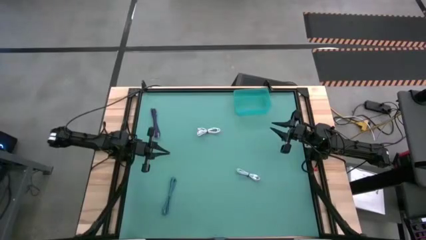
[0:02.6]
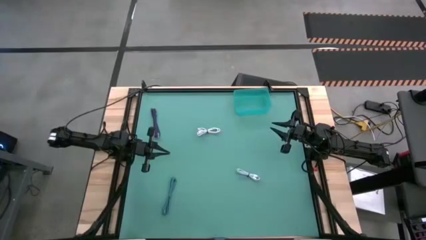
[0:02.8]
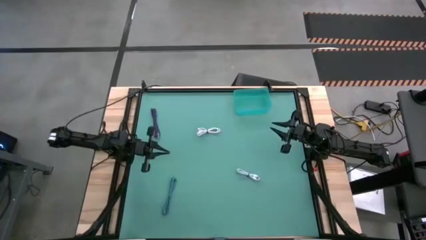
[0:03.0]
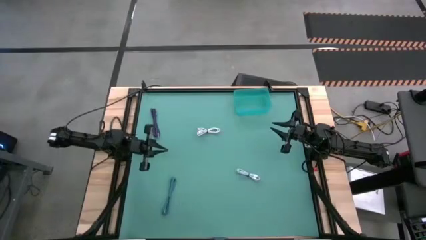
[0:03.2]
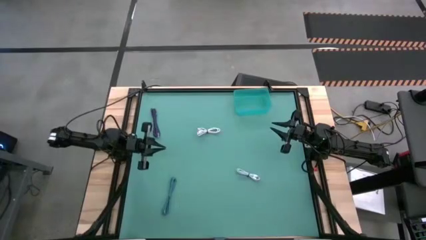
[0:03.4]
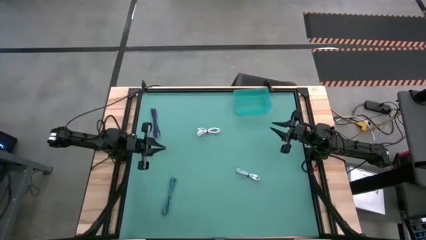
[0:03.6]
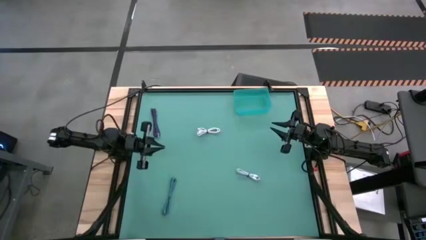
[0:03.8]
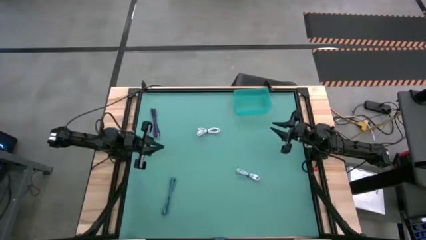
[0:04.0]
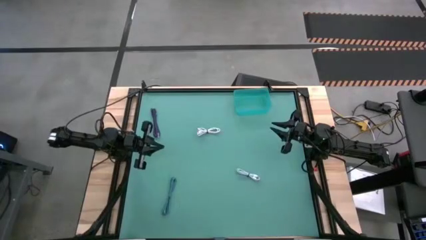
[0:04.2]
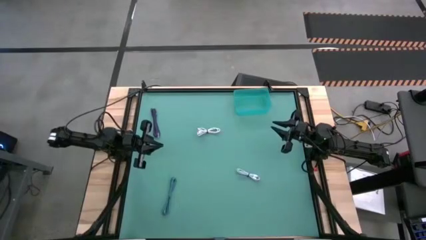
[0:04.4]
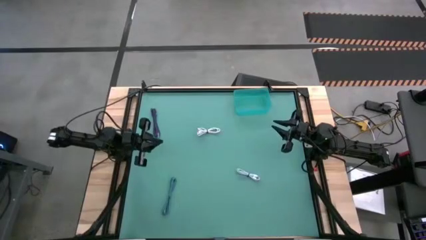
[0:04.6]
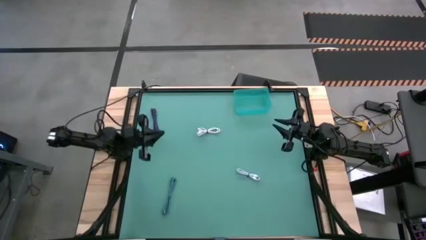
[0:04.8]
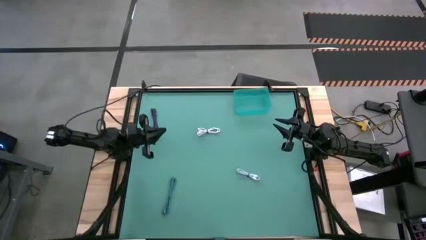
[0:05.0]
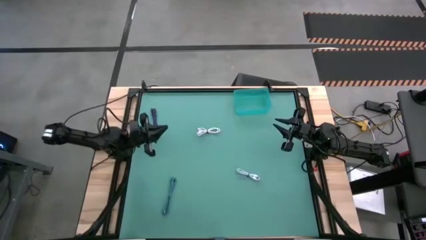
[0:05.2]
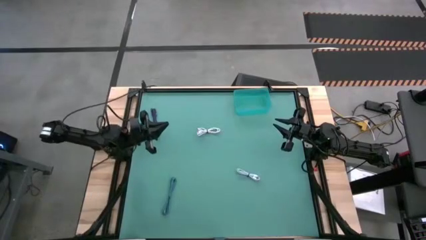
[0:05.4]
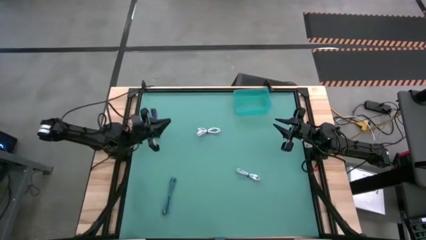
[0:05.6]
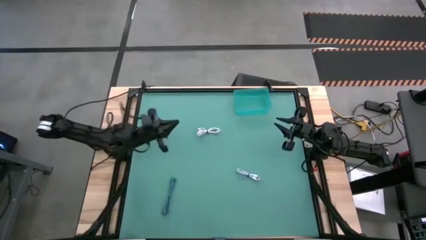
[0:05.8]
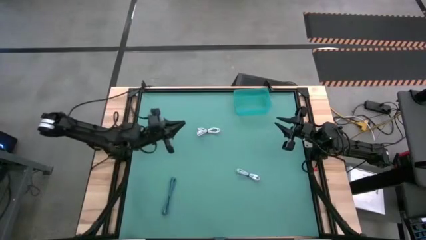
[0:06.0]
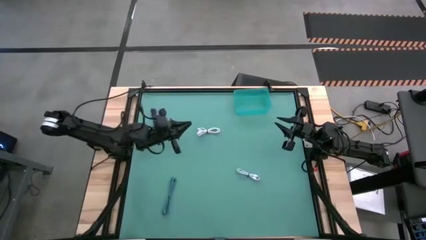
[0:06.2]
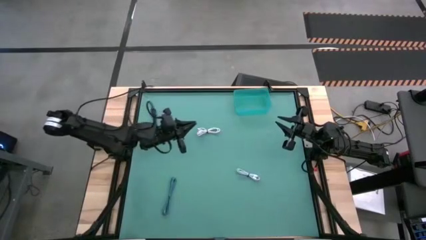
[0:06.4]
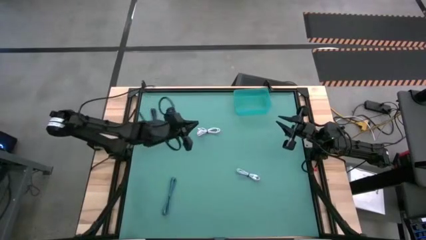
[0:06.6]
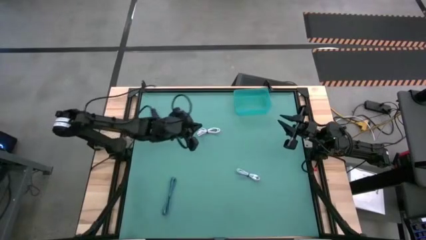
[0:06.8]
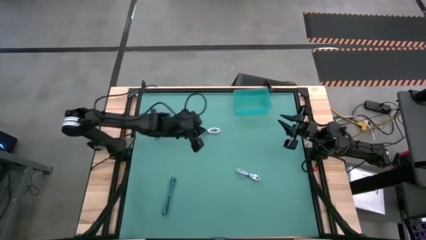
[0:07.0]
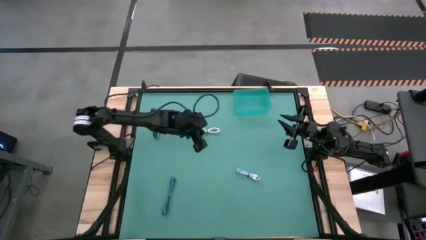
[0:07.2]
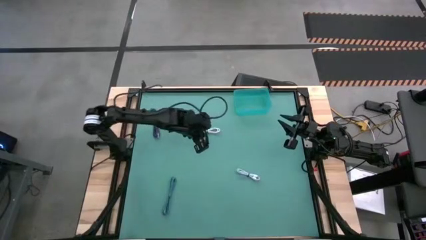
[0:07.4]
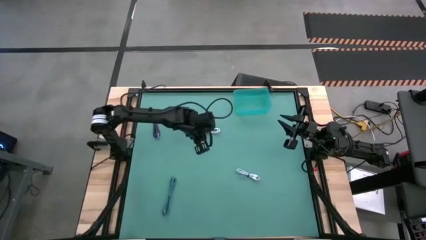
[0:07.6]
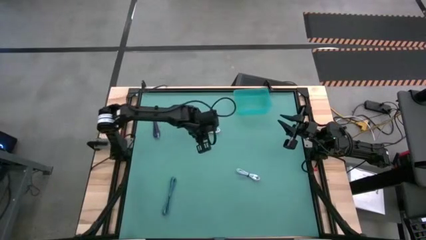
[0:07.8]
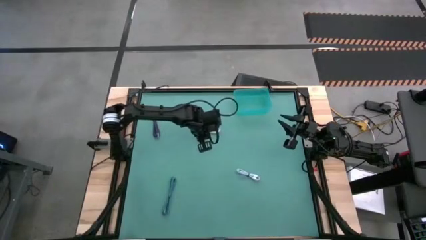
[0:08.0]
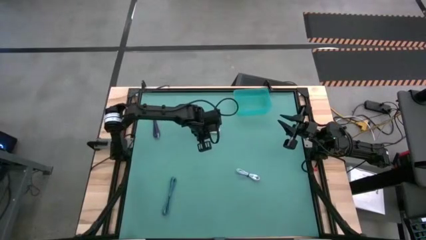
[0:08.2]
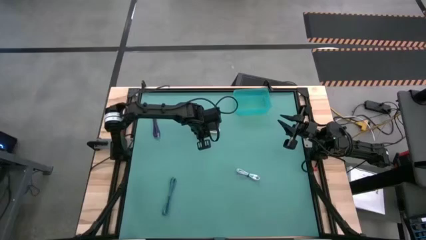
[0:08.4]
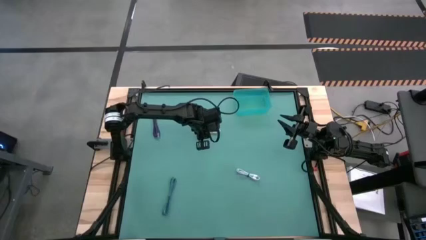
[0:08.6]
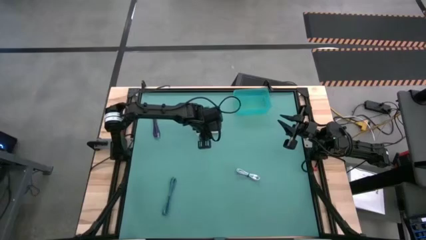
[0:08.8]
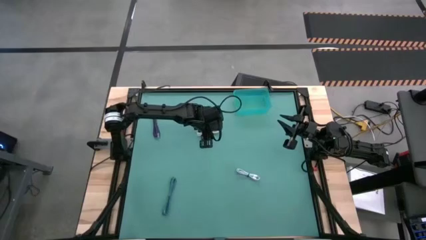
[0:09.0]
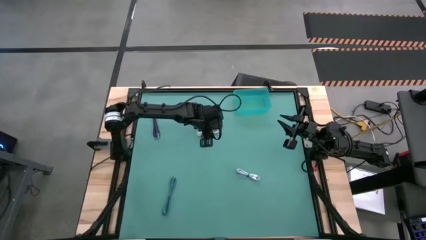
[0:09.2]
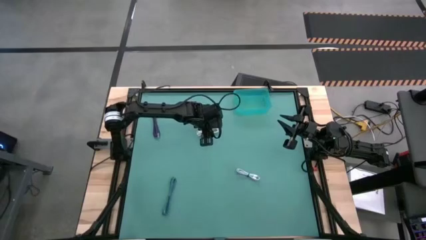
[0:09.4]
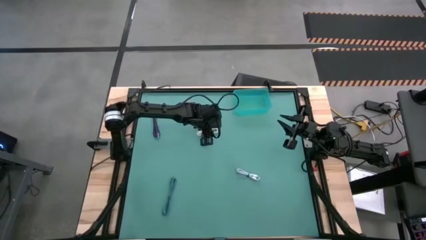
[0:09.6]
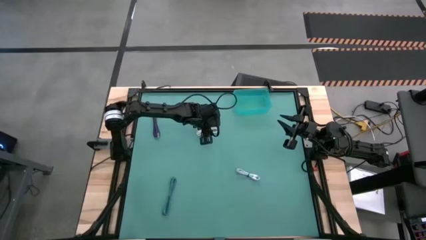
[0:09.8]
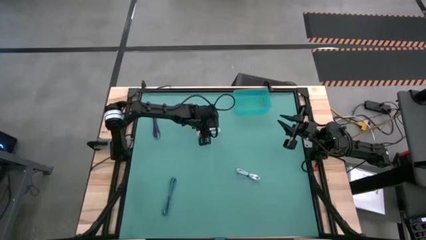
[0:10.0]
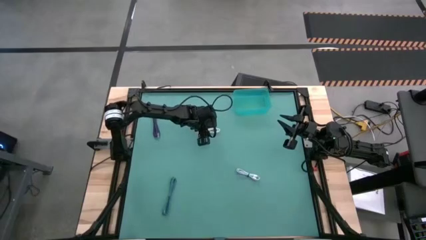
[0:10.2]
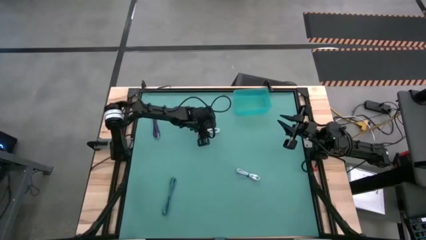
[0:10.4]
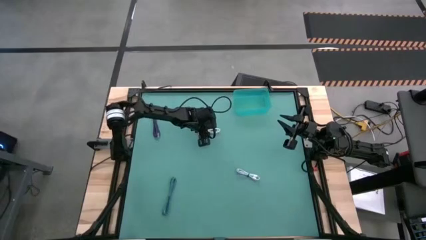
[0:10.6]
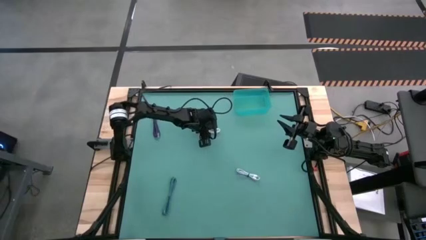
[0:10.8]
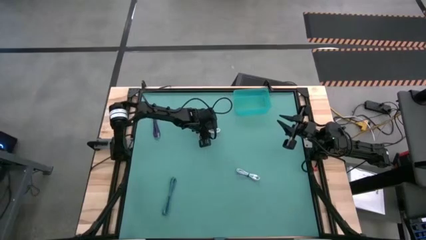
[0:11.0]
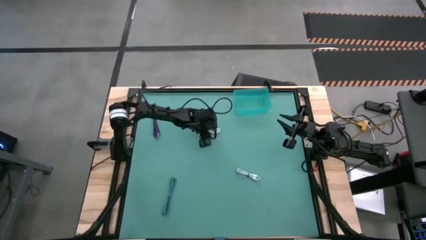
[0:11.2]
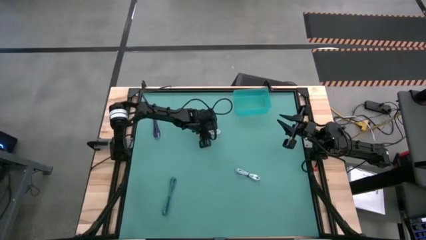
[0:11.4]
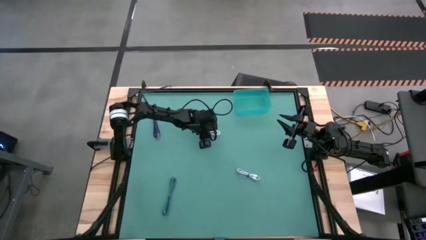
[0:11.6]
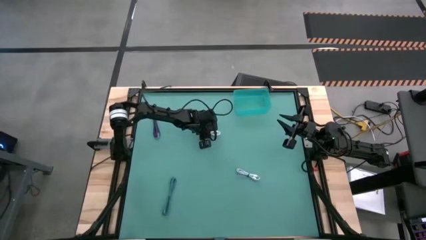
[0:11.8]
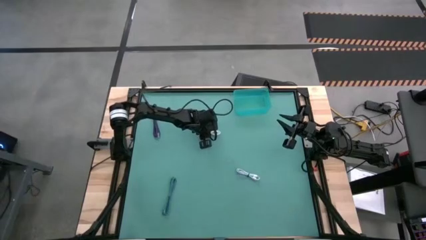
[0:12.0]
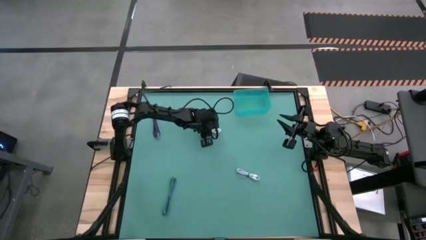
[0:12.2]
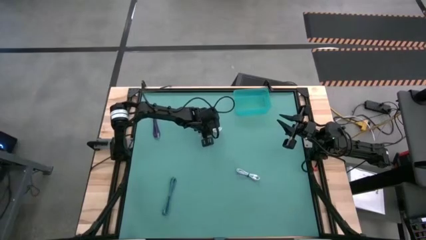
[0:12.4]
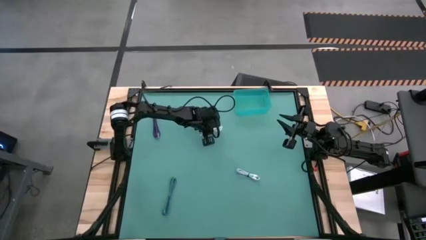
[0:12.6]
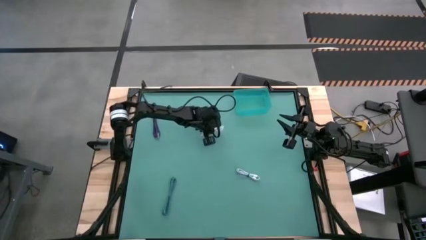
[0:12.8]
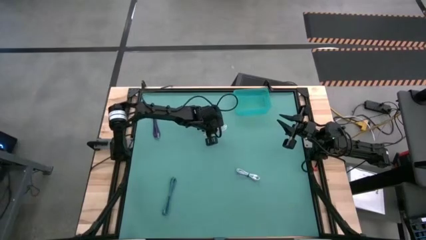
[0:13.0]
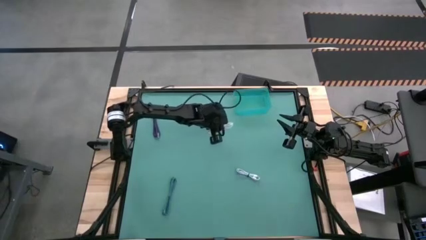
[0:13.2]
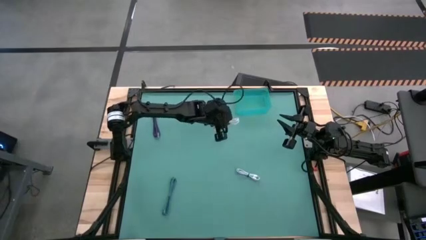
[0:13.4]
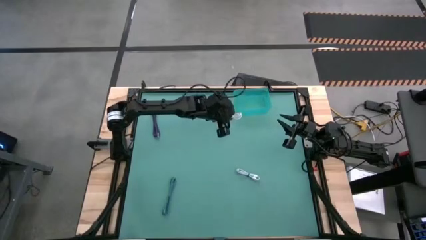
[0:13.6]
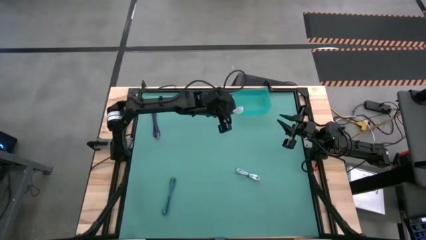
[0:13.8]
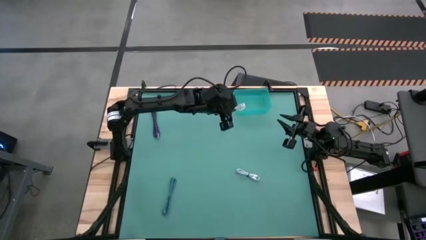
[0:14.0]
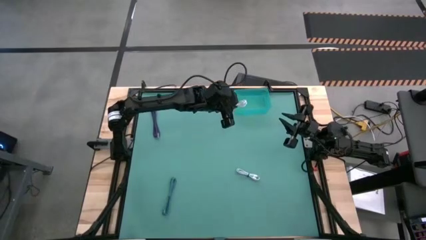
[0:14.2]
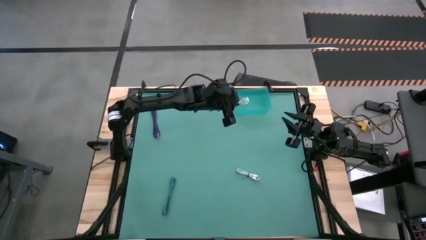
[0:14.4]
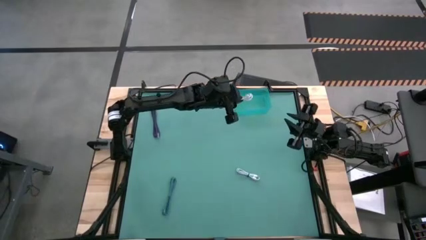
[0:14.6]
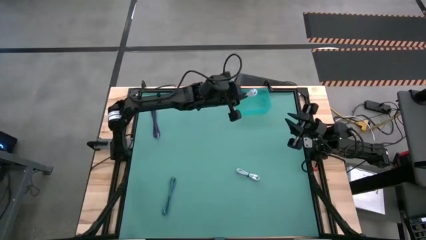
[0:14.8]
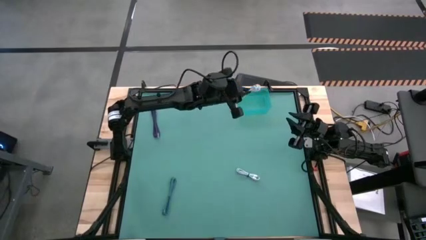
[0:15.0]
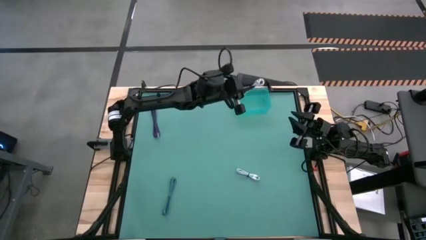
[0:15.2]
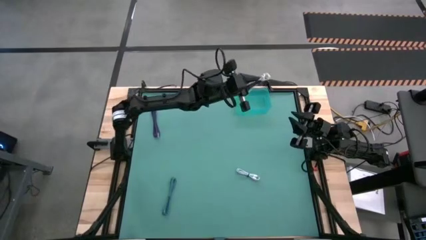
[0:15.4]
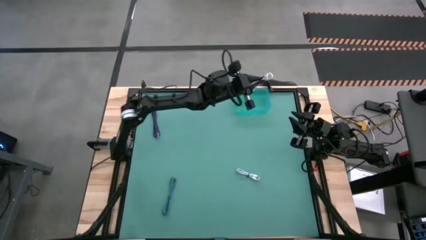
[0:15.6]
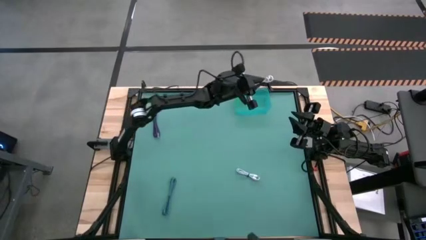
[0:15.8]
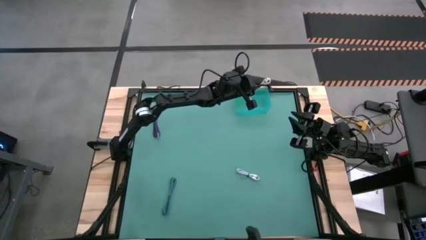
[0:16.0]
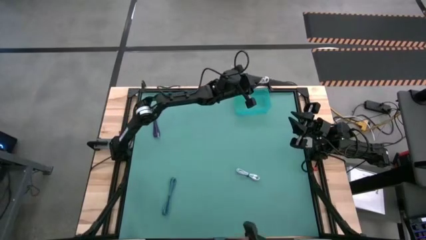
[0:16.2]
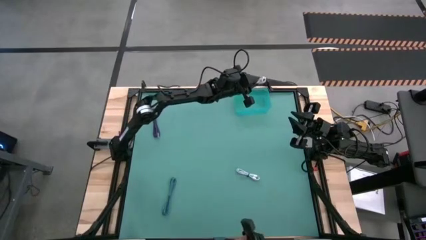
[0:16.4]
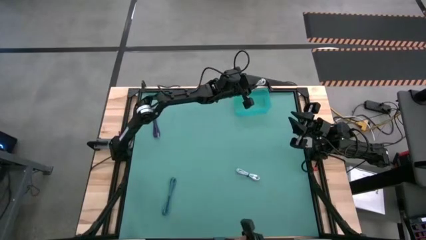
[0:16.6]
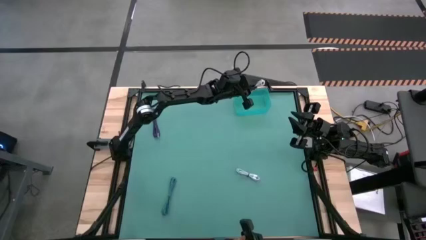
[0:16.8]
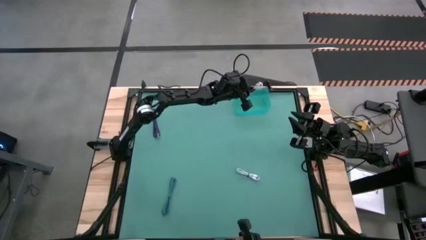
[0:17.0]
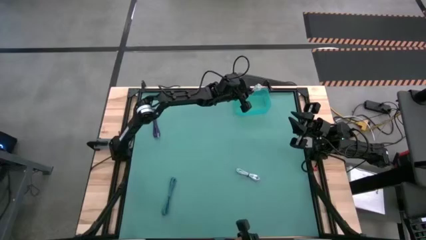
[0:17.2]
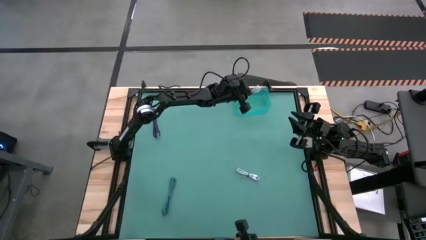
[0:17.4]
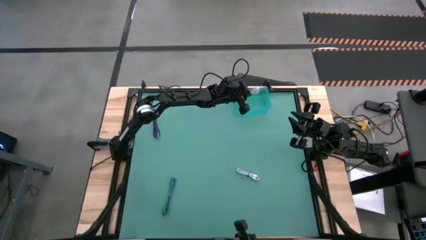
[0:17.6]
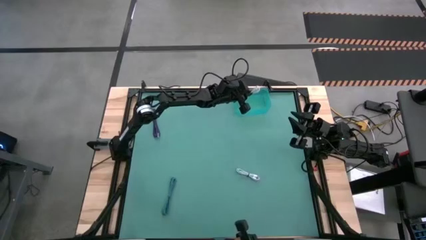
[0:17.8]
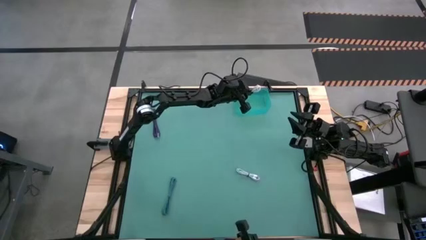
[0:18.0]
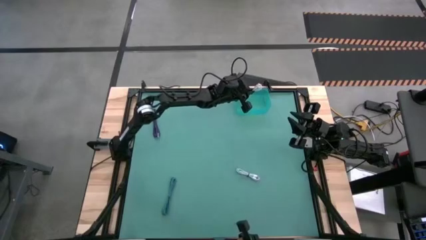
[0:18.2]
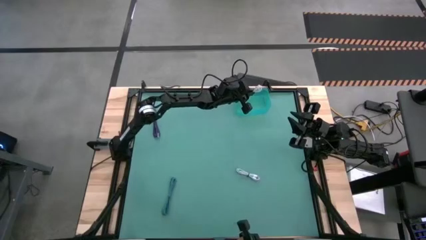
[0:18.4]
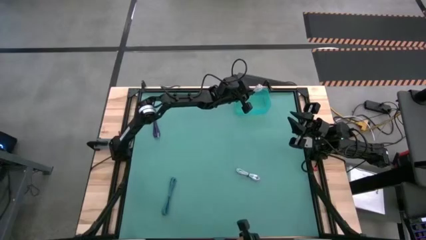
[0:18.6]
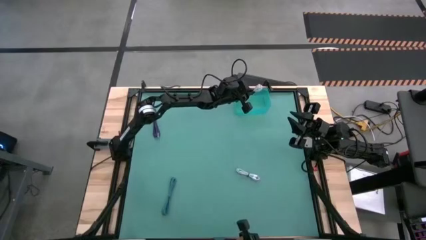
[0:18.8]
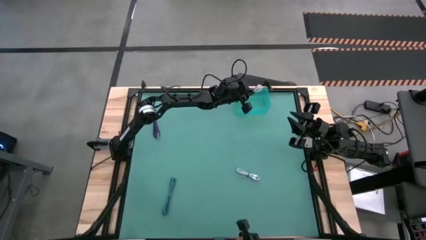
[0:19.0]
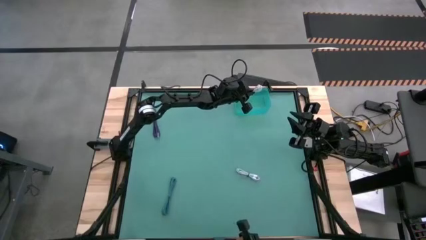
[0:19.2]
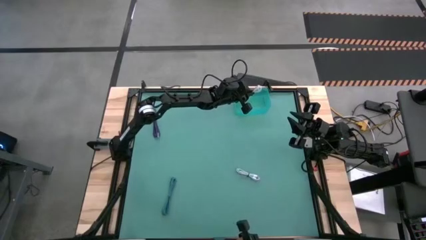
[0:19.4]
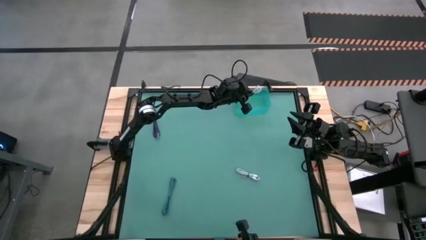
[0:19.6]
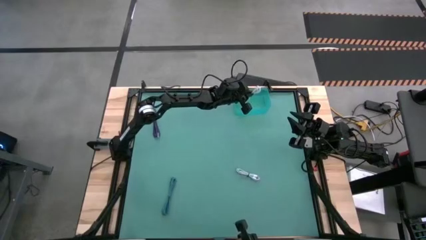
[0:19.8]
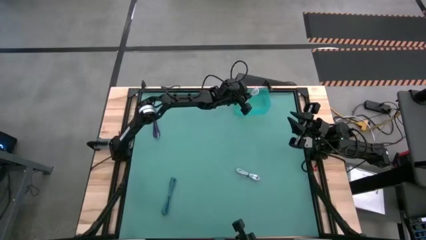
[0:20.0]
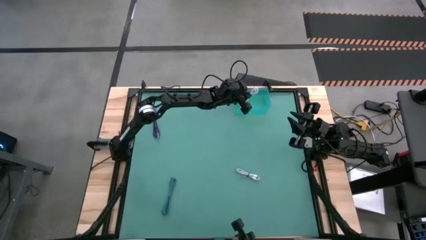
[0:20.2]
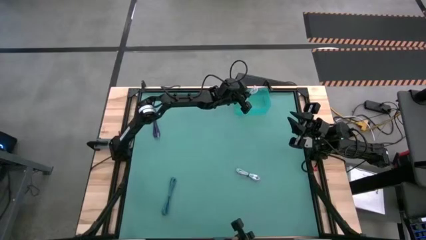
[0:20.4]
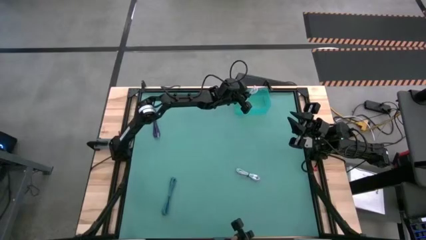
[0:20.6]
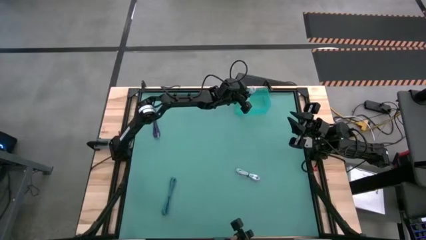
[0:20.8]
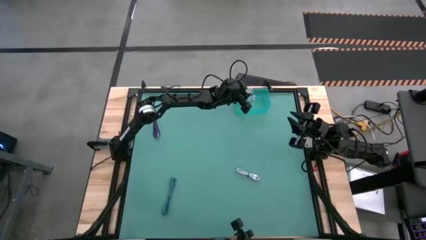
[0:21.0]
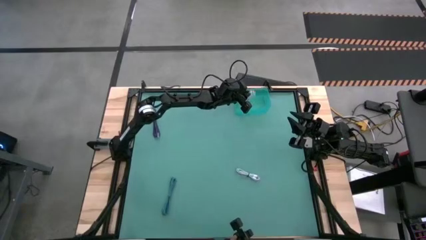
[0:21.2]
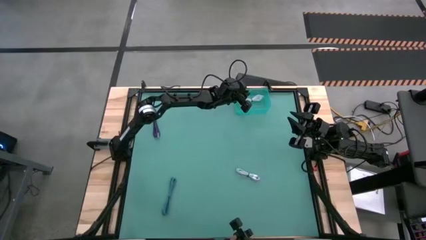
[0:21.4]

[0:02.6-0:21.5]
Task: Pick and place USB-C Cables
Put the top white charger cable into the blue bin
